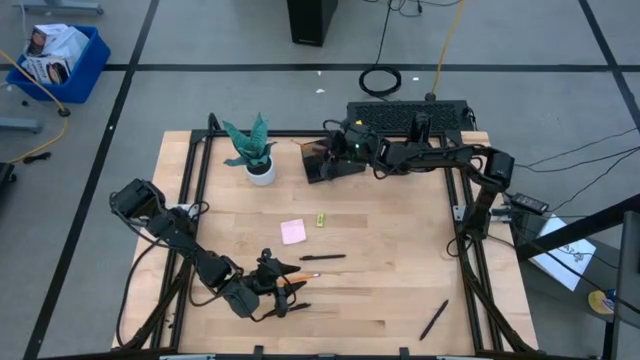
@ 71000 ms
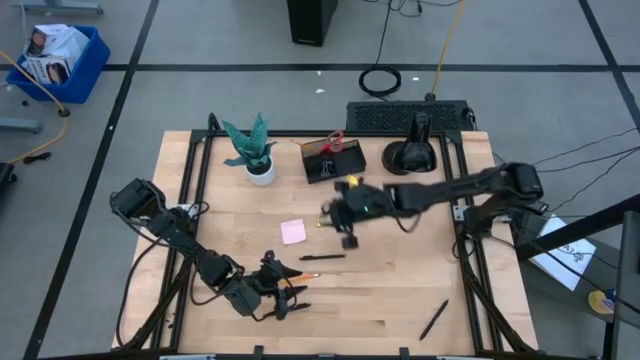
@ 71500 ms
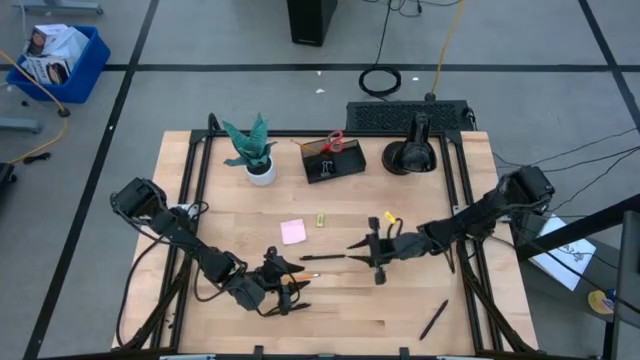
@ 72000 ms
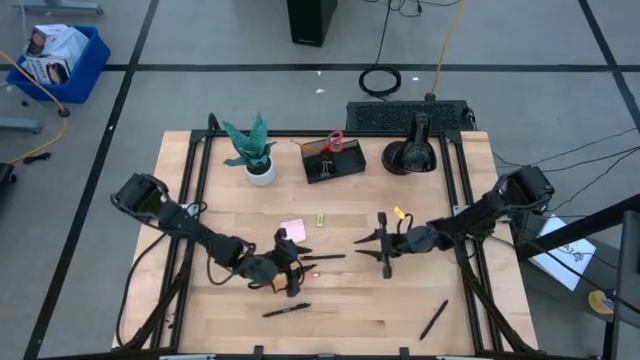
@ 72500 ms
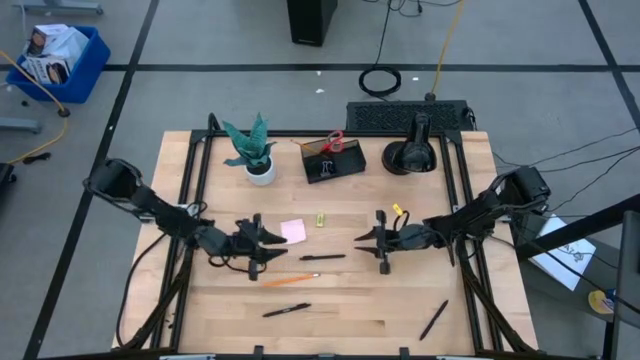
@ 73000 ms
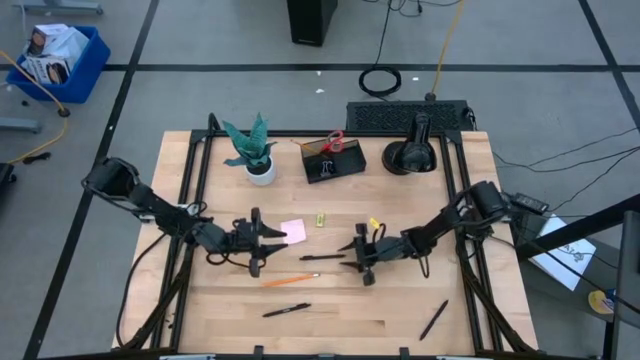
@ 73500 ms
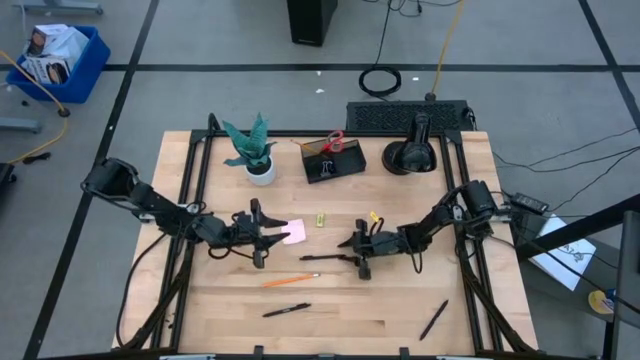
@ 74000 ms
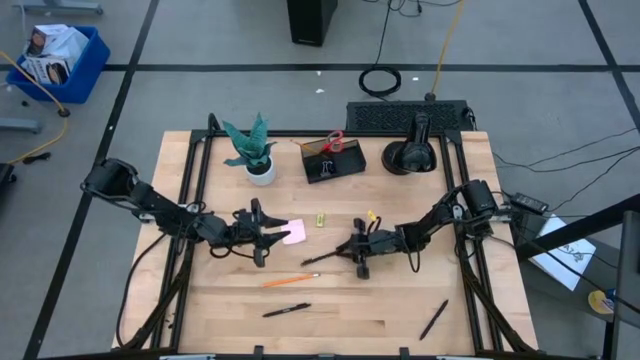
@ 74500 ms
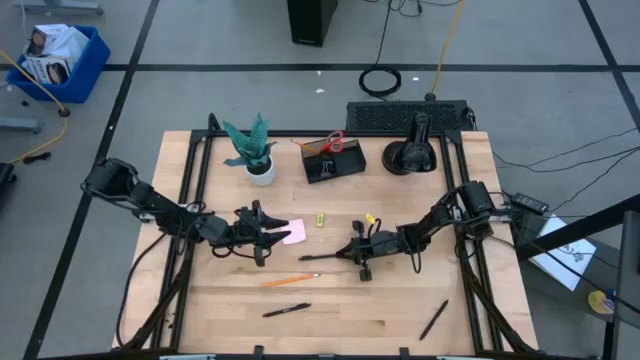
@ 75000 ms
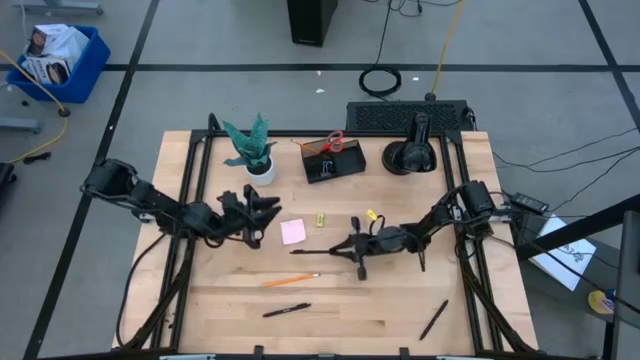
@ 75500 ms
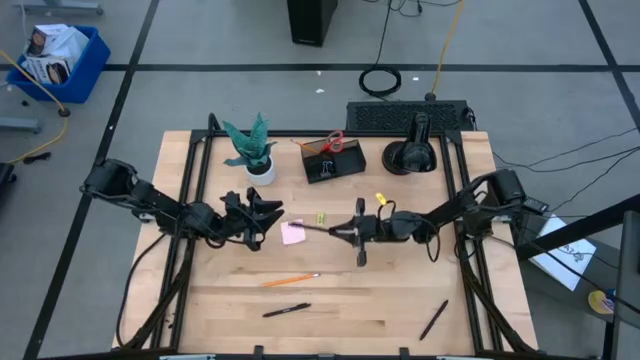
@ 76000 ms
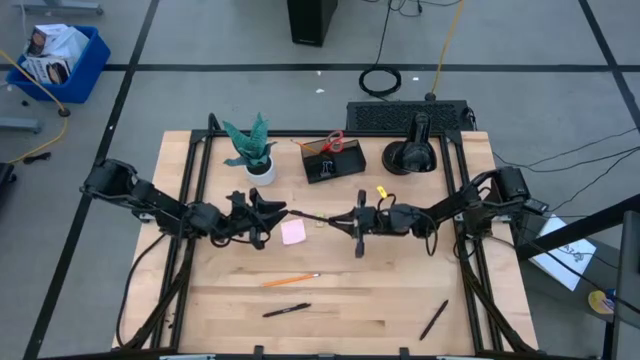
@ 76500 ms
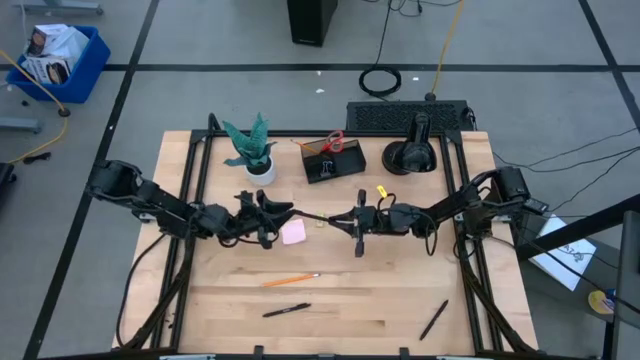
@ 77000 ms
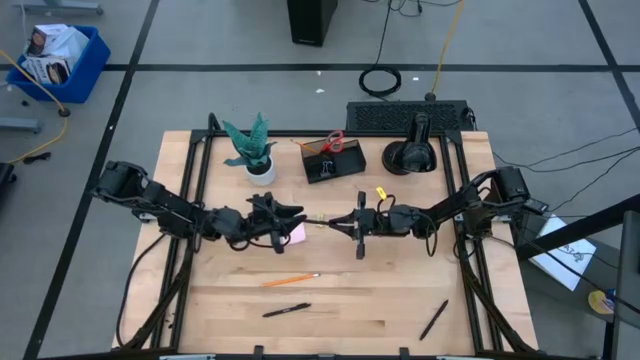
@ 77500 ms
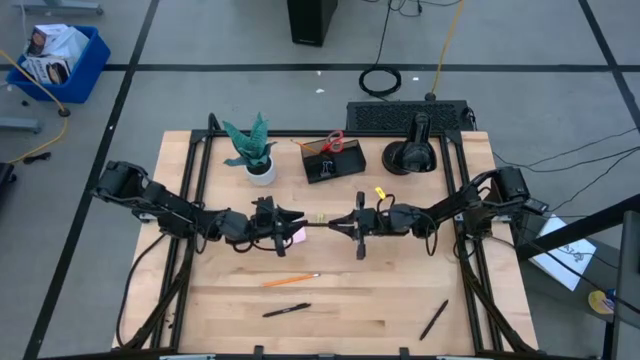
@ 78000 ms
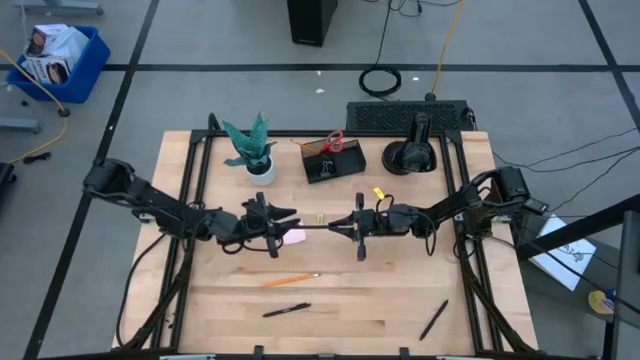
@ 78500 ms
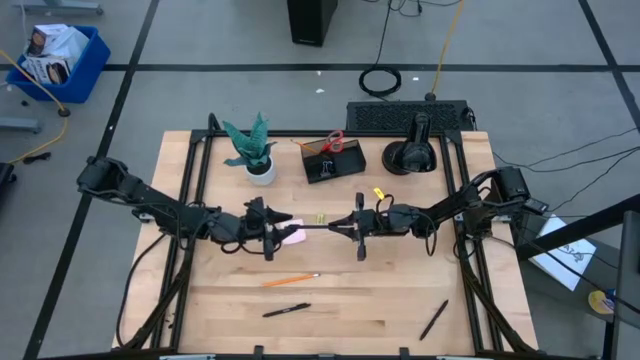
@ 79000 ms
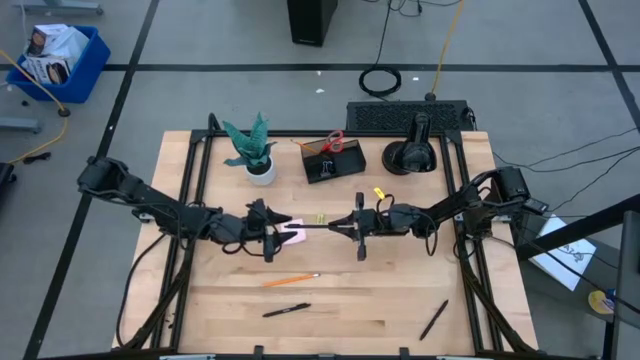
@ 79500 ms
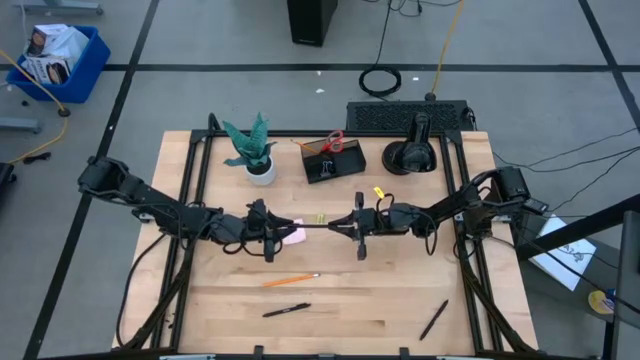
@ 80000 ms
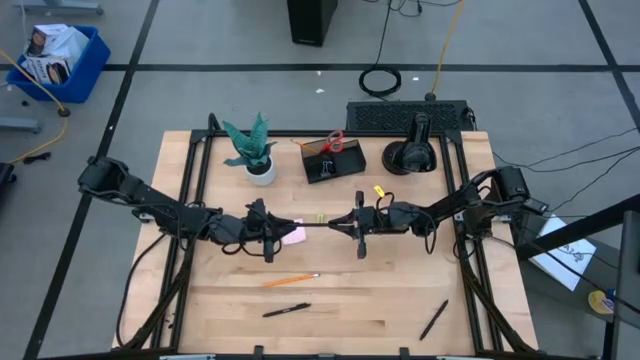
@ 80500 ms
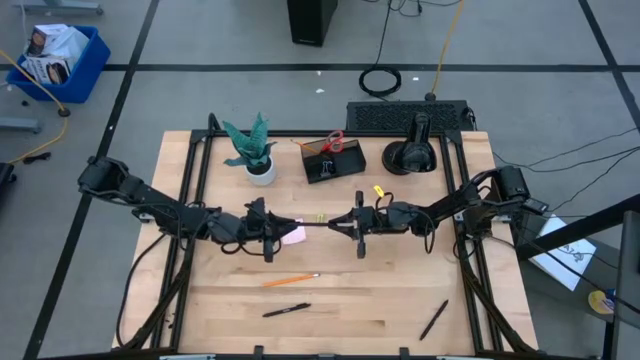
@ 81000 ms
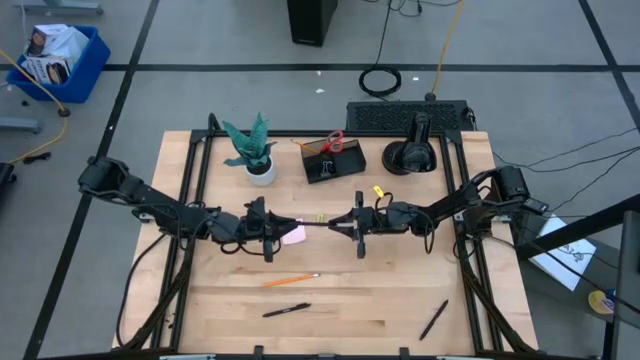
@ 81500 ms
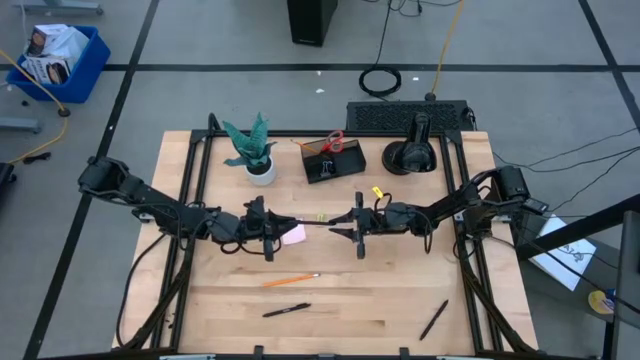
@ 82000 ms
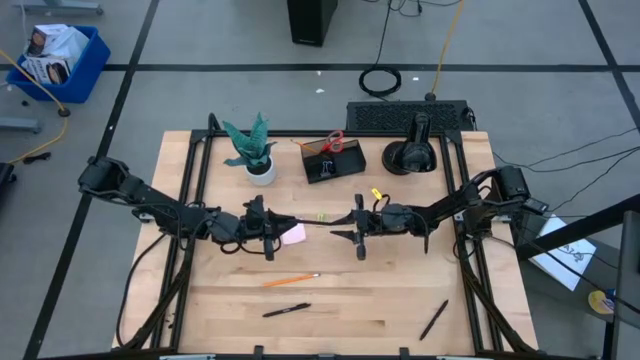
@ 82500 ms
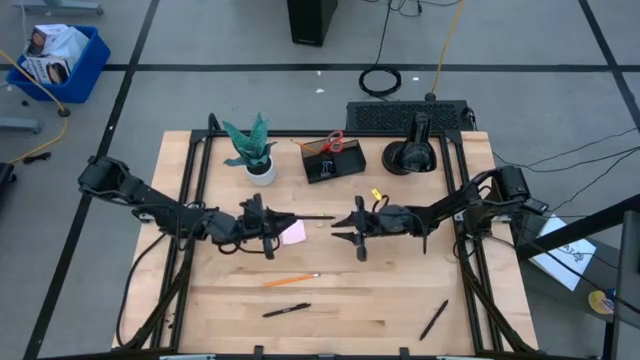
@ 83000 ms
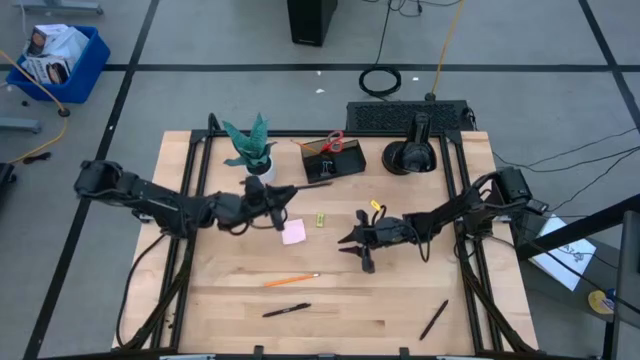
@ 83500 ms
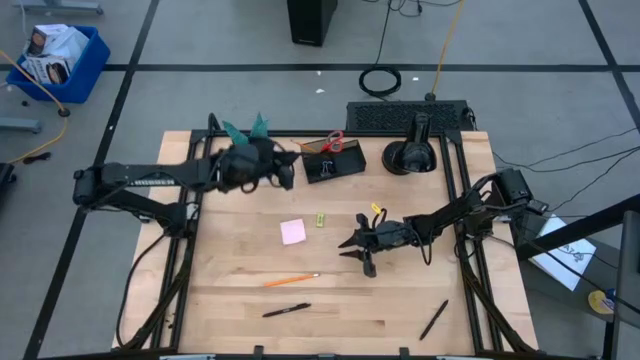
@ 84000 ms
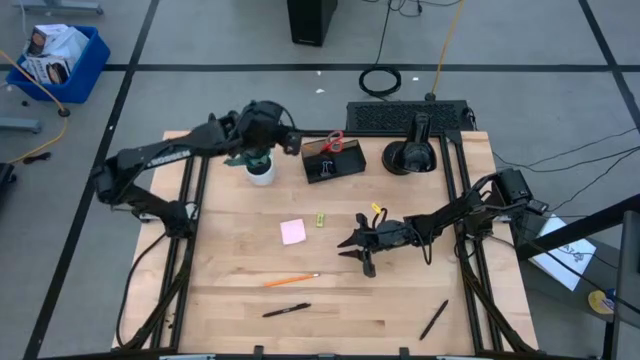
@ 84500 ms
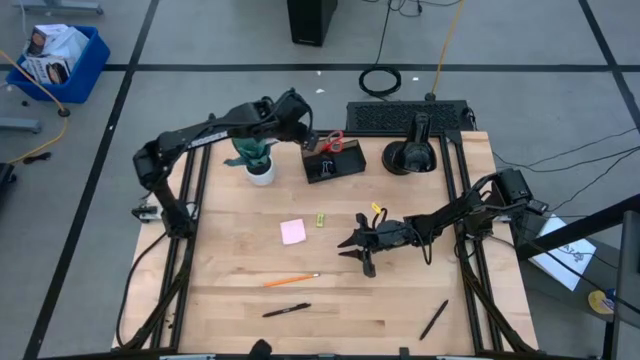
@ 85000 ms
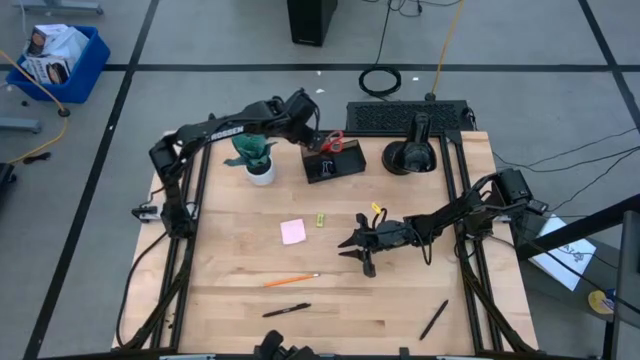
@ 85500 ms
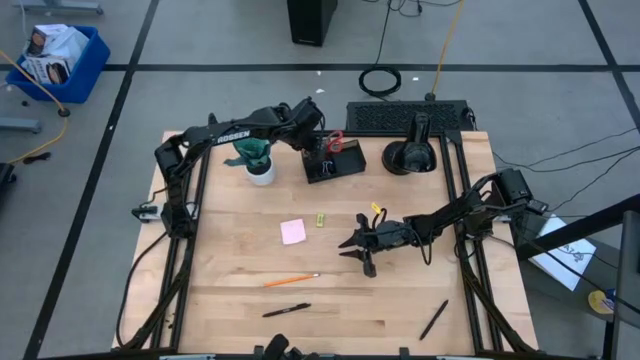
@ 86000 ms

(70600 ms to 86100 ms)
Task: Pick and place office supplies into organizer
Put the black pen into the black mesh desk organizer

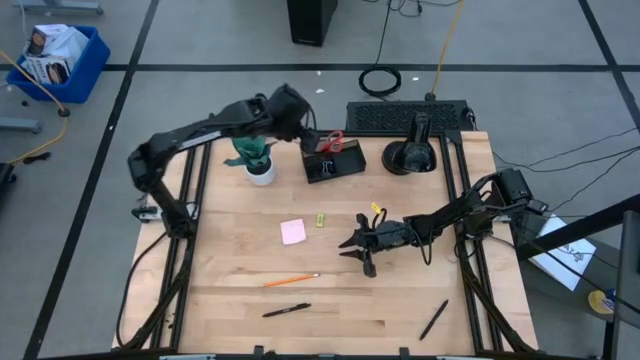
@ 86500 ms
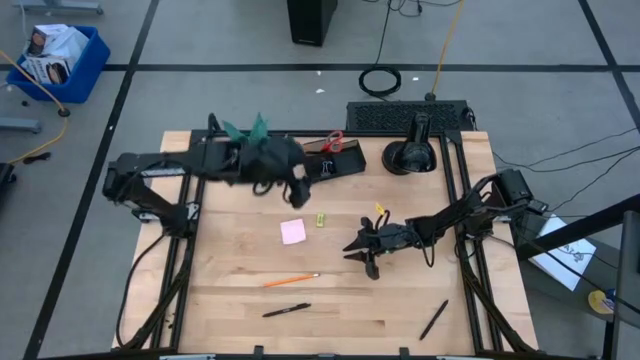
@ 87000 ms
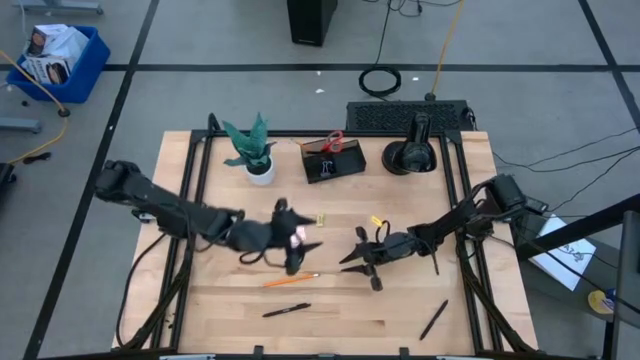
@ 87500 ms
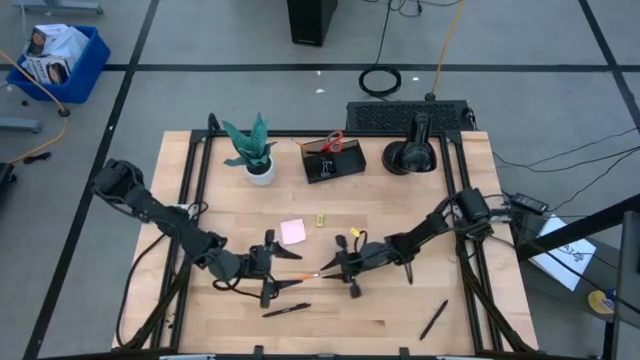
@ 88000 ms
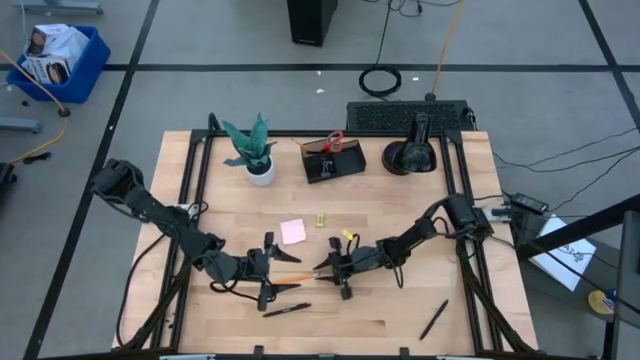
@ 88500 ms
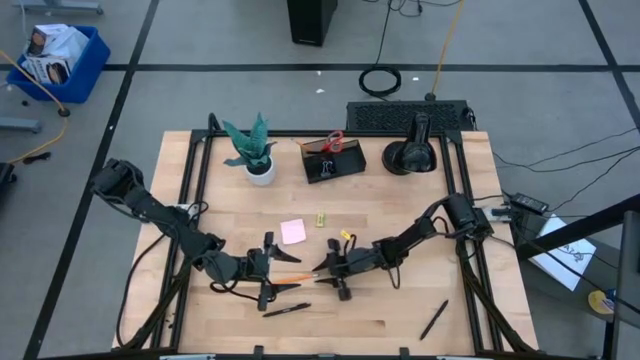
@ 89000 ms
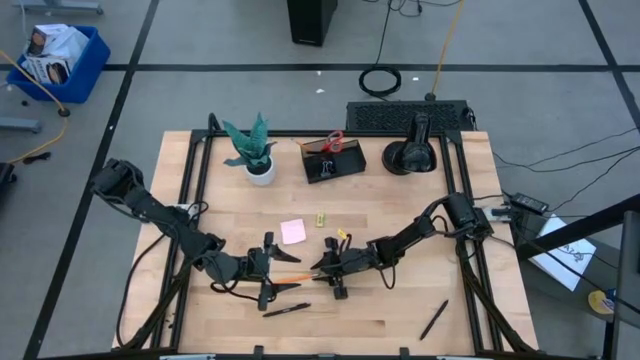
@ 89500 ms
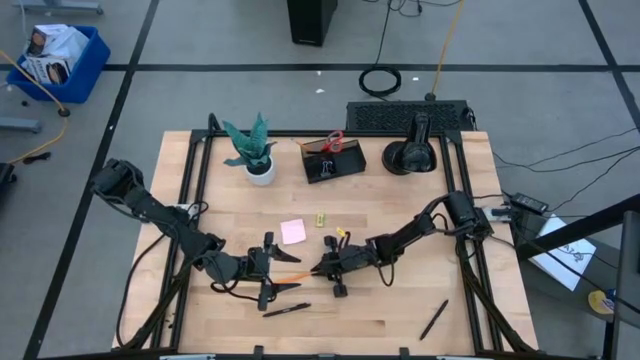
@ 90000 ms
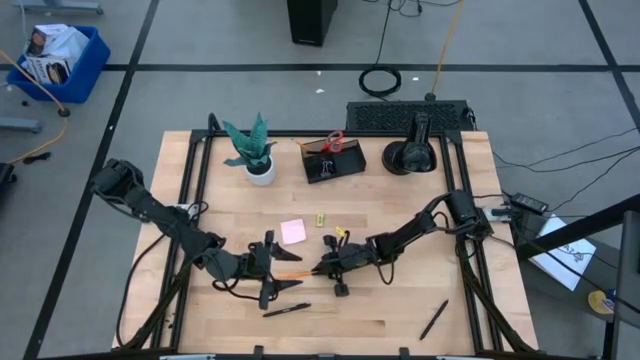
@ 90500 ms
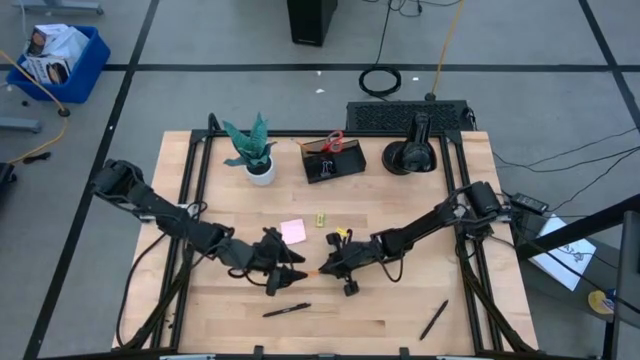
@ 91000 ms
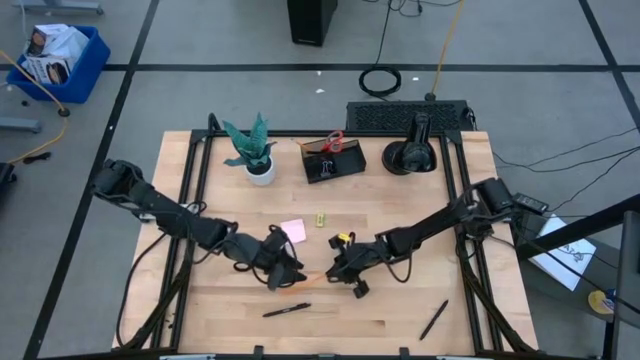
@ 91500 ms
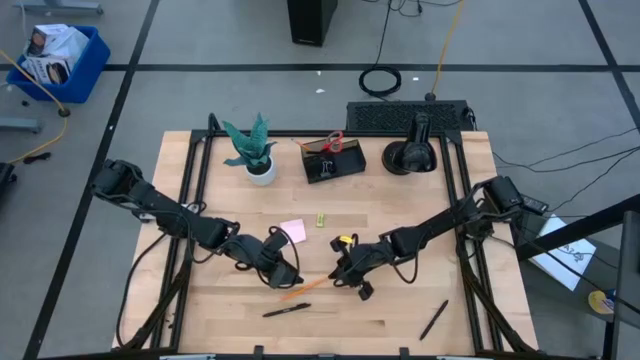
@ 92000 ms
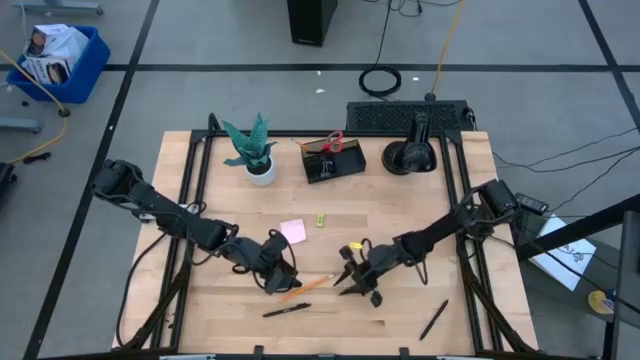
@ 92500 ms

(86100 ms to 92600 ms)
Put the yellow pencil into the black mesh desk organizer
